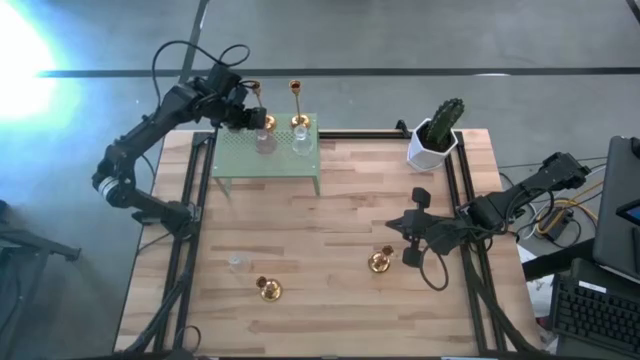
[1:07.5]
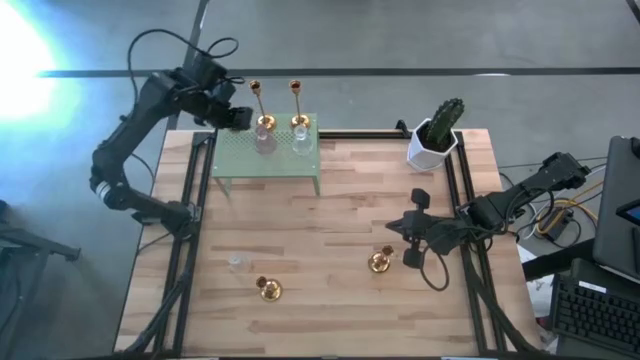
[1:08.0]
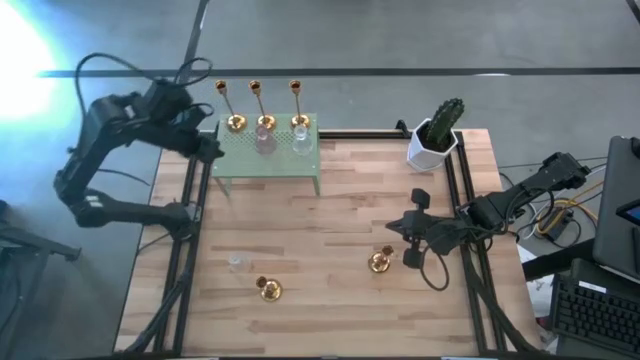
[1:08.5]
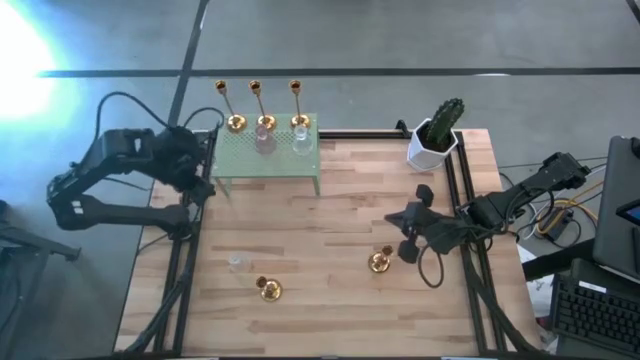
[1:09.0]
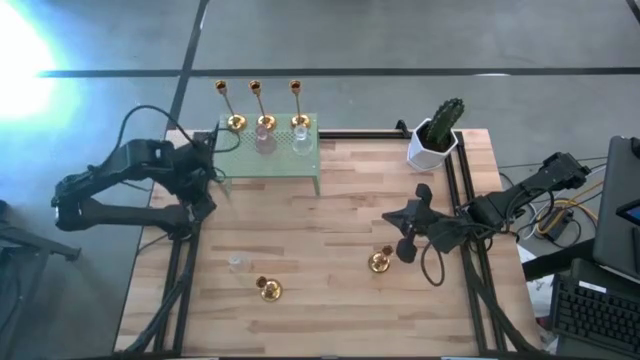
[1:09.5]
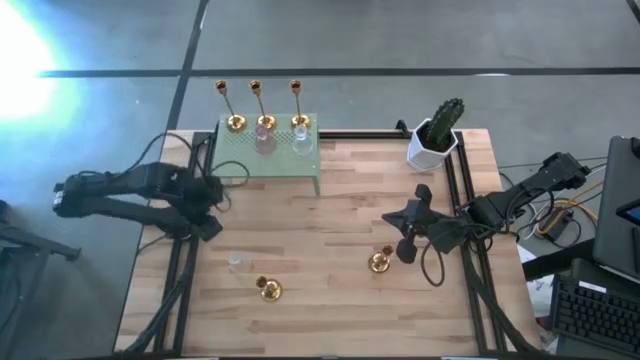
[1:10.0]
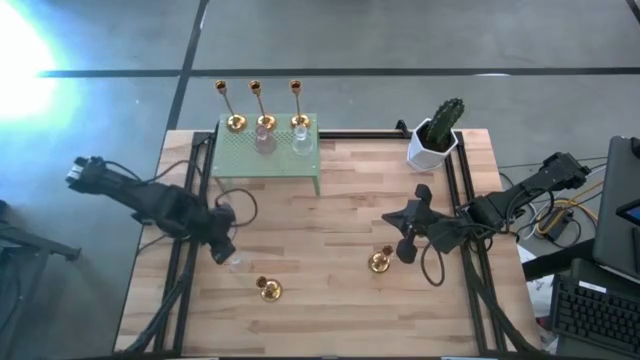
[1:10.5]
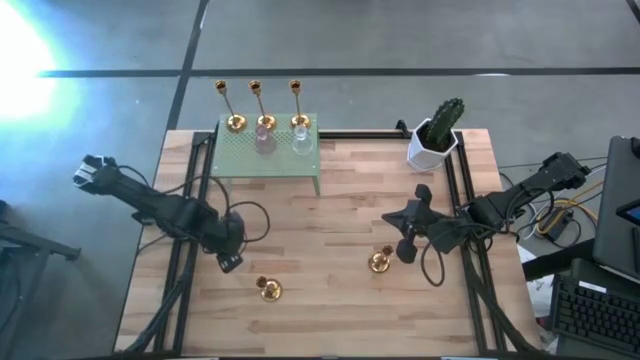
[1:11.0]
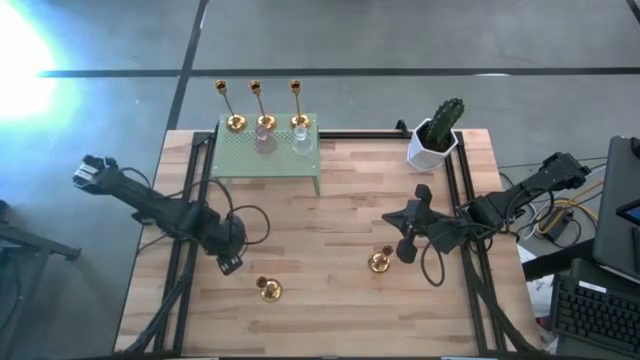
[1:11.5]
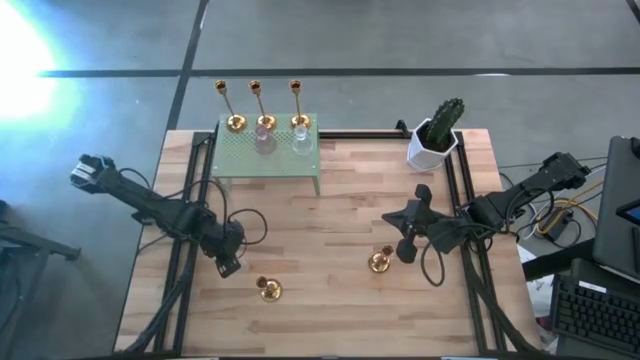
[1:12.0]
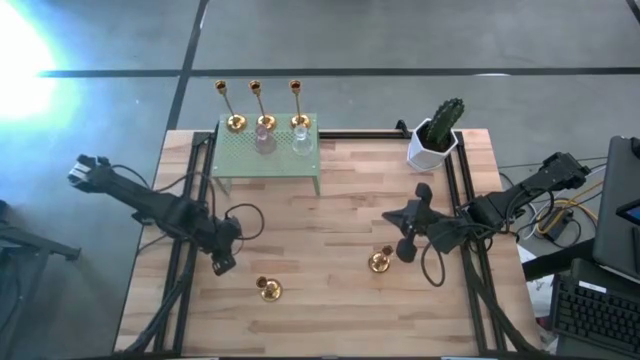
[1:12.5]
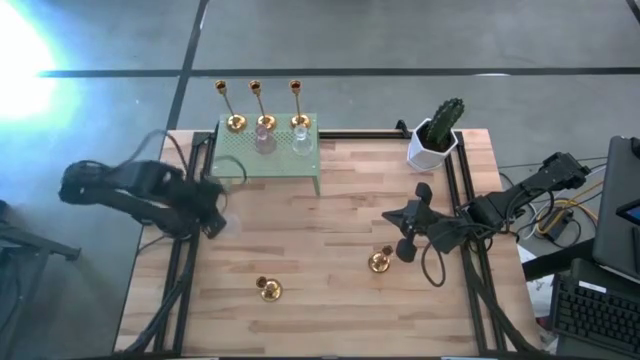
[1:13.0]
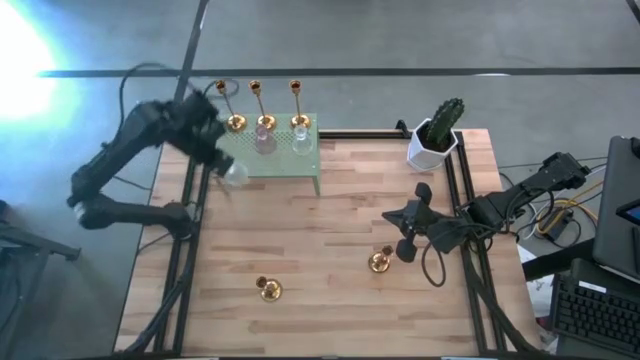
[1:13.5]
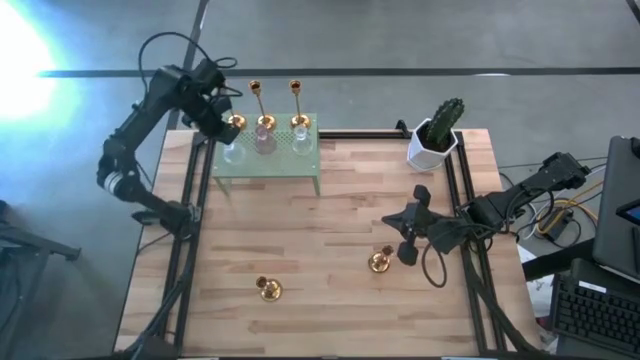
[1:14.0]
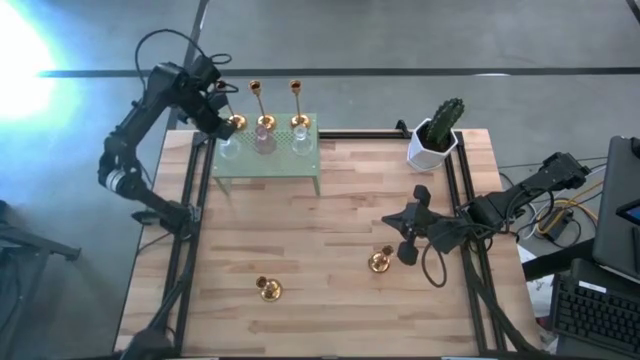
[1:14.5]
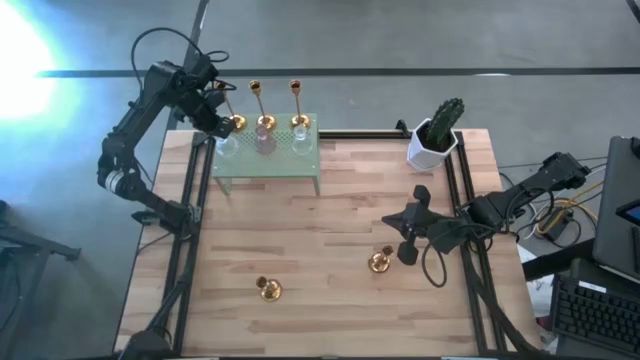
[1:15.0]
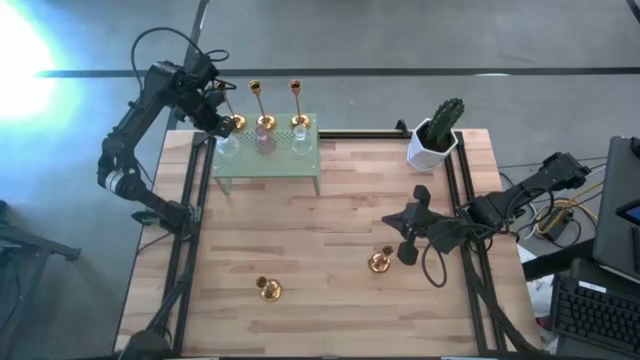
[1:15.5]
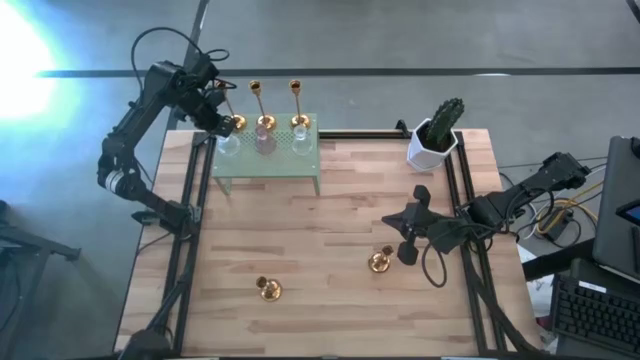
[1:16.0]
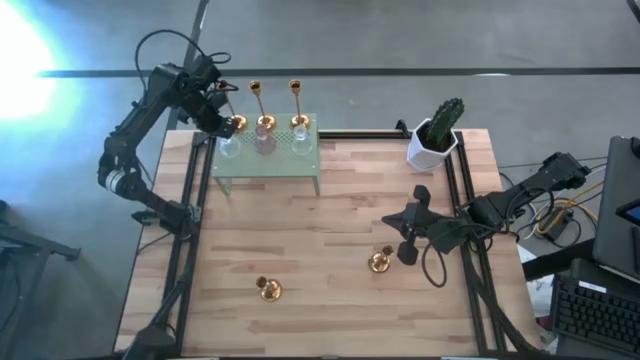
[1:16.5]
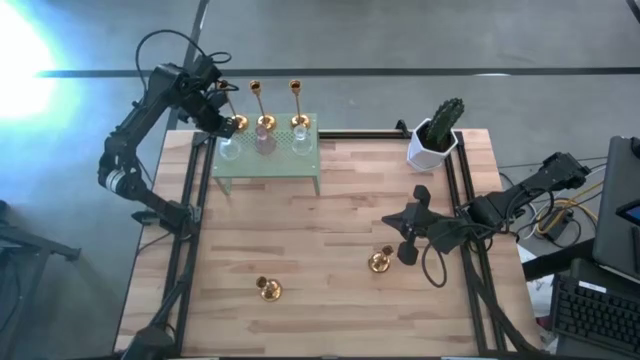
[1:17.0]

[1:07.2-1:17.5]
Task: Pick & Place candle stick holders
Put the transparent candle holder on the shelf

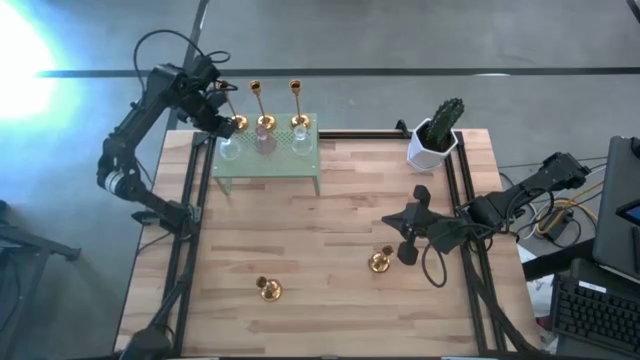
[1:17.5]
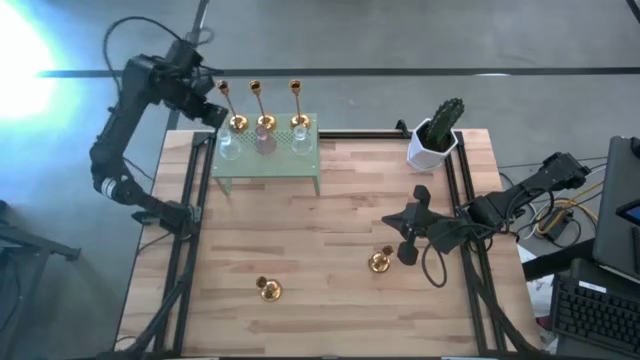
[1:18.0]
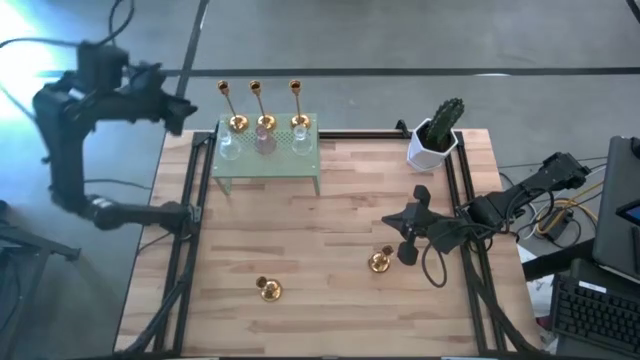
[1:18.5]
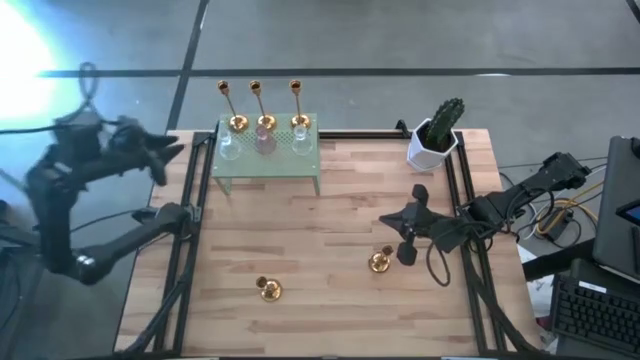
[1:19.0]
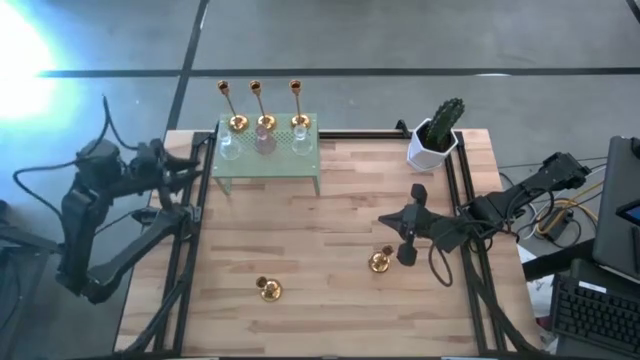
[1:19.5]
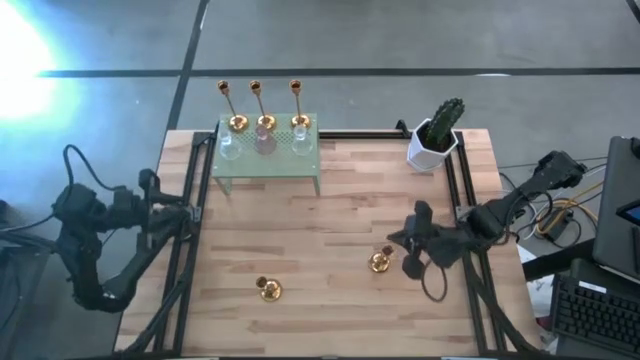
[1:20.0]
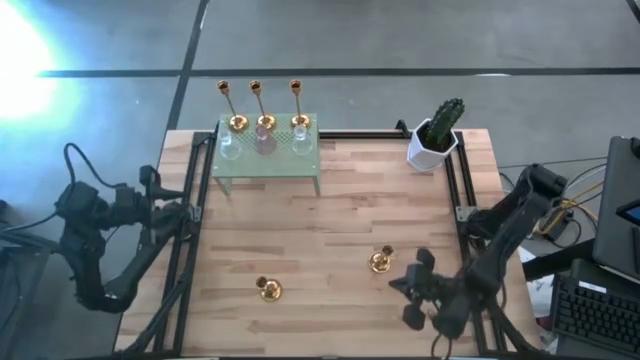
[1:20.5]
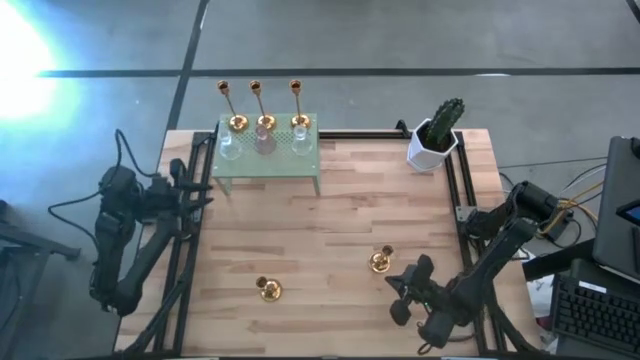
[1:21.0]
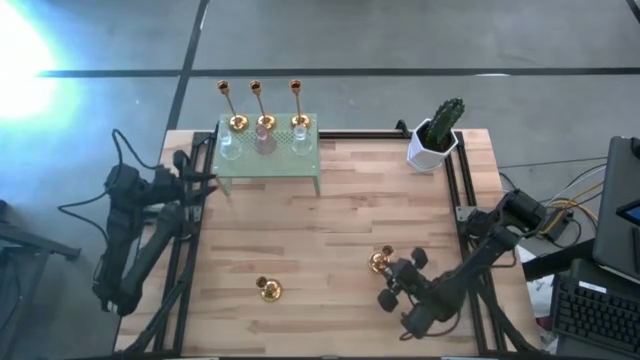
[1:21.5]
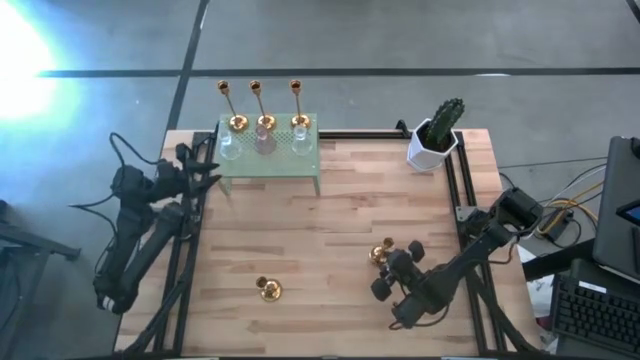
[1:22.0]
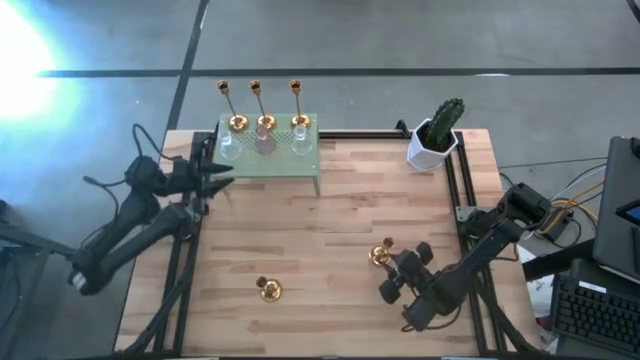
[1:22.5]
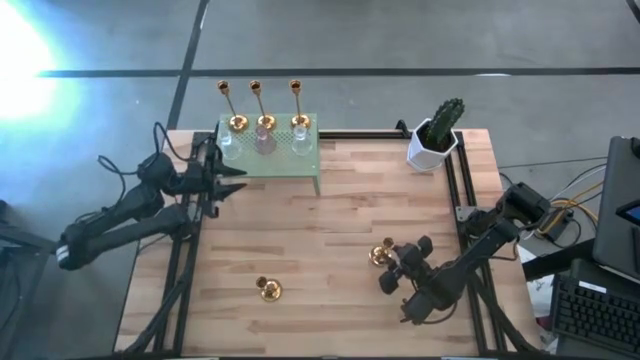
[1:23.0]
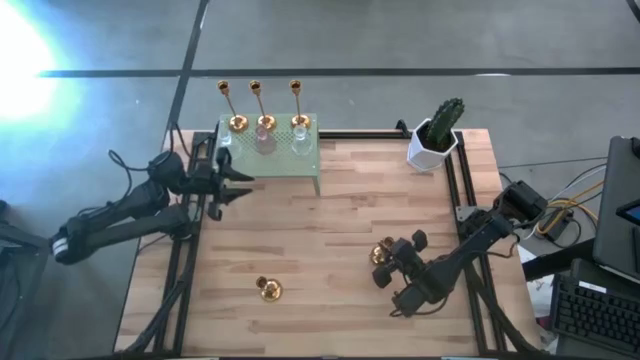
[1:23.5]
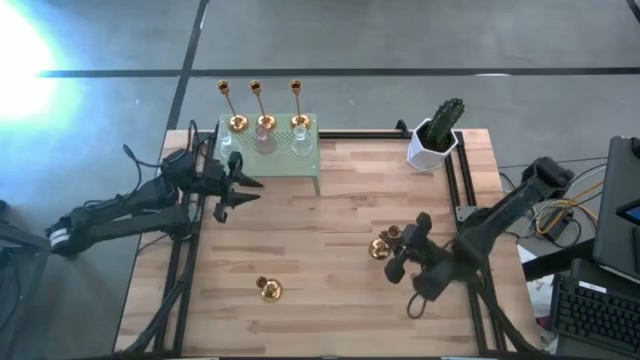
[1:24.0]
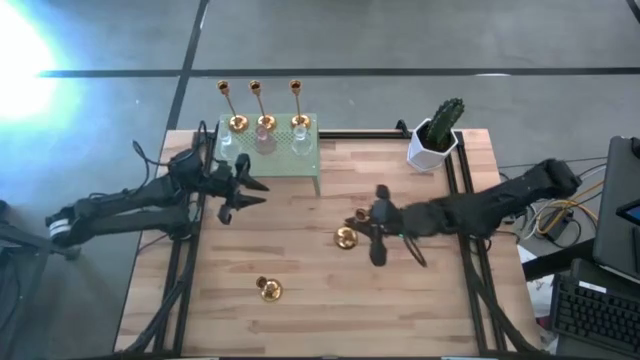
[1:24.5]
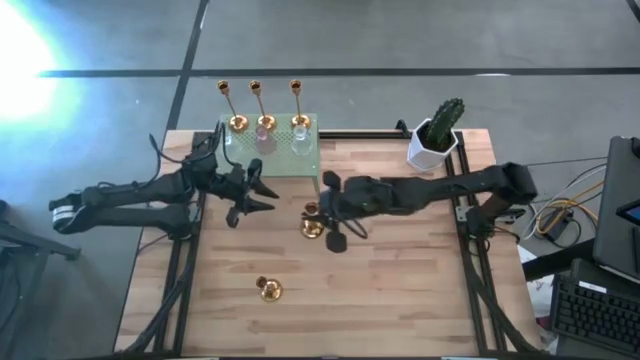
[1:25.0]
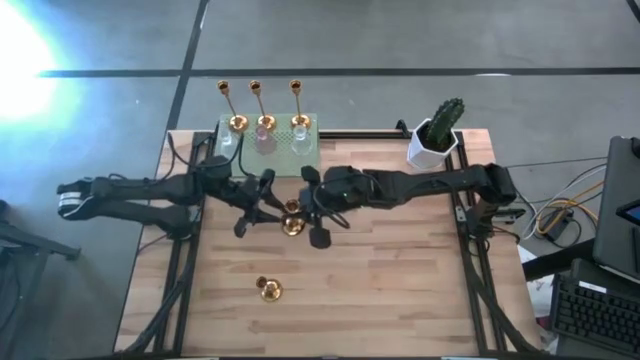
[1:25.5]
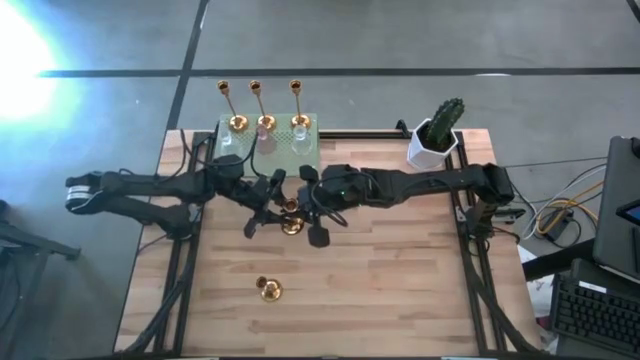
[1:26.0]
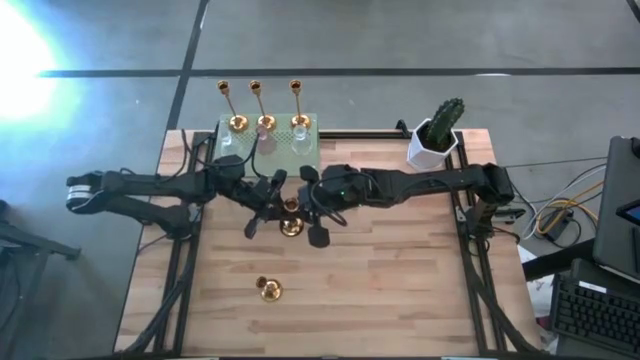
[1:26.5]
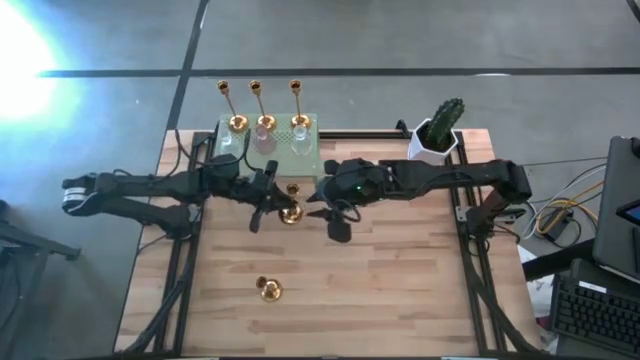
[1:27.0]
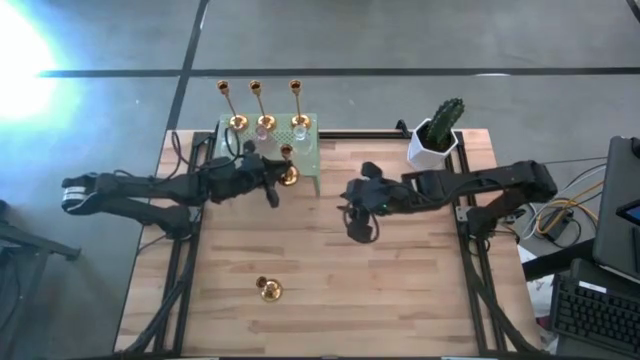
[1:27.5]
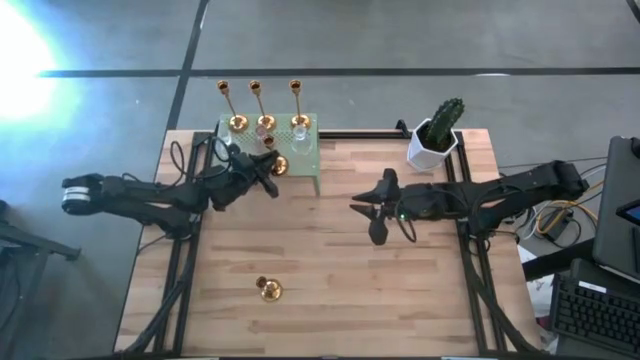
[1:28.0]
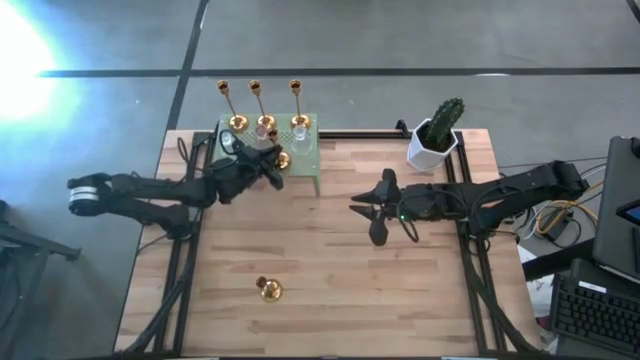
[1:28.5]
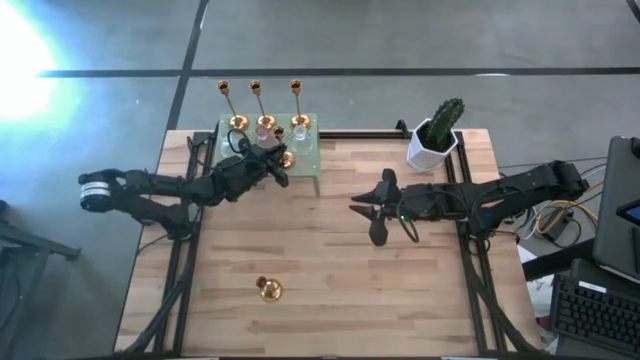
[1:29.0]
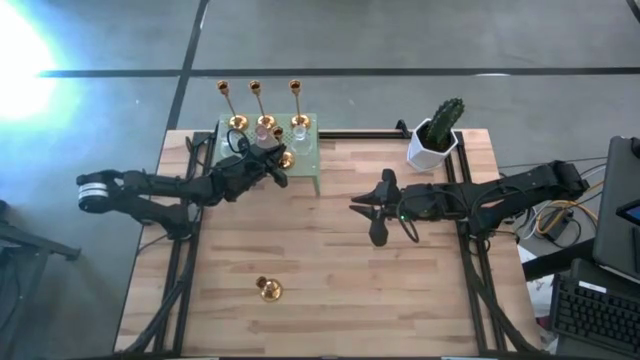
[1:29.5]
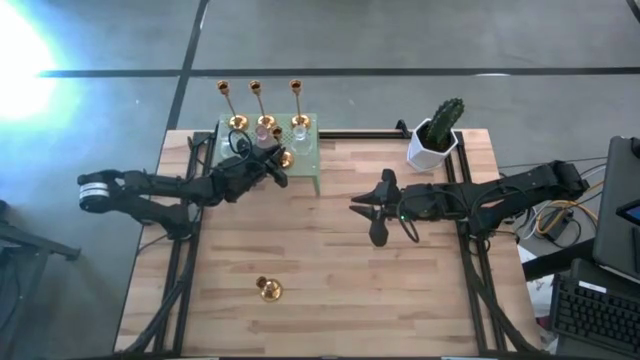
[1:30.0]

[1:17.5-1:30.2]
Put the golden candle holder on the shelf
